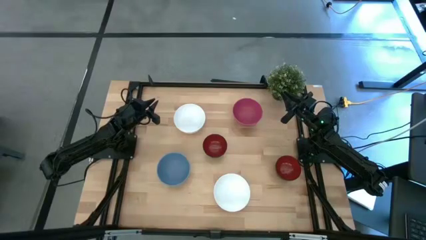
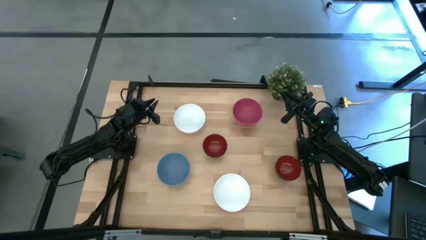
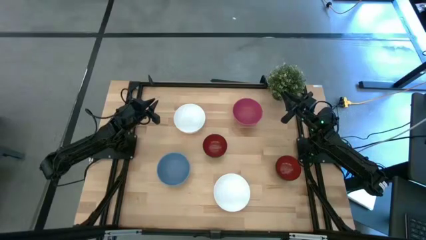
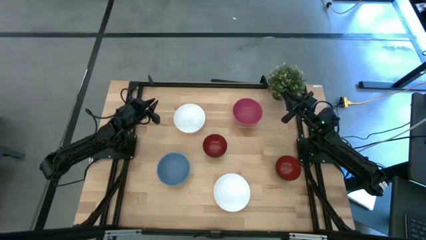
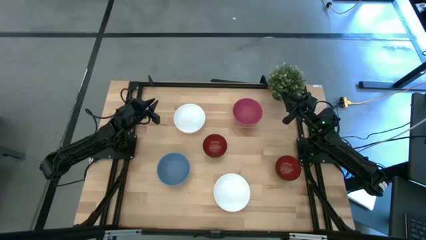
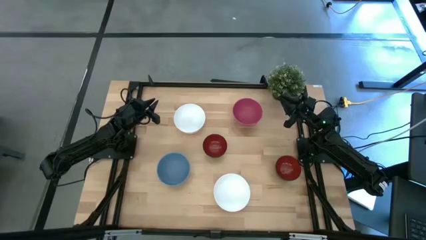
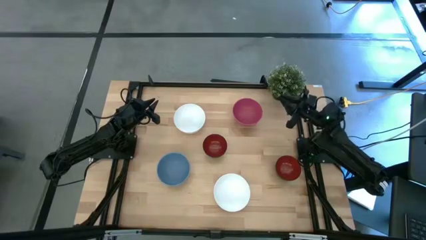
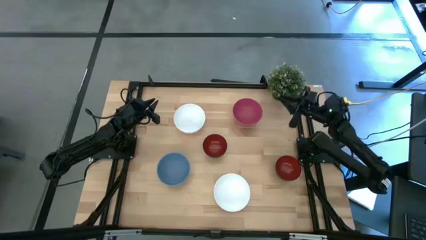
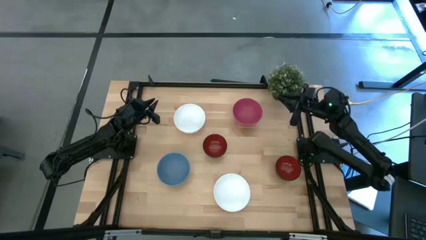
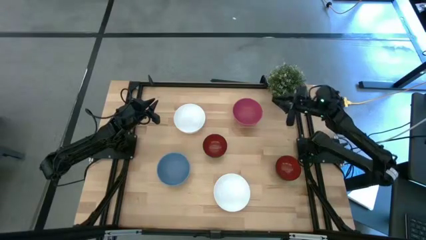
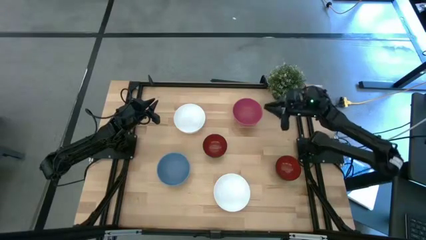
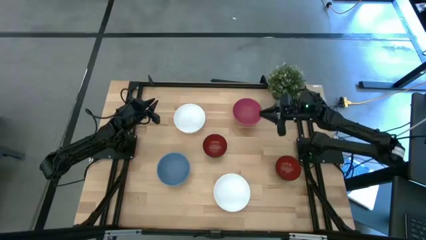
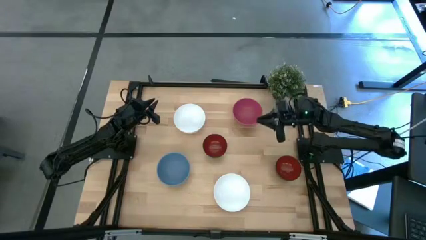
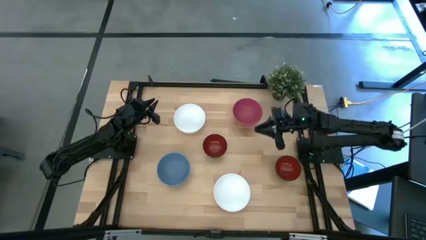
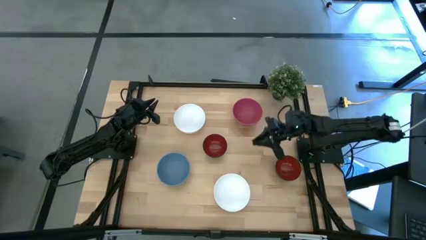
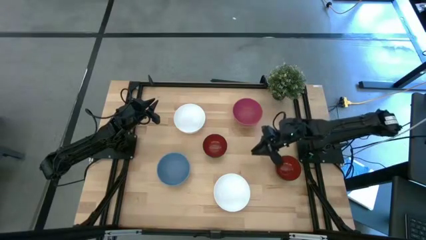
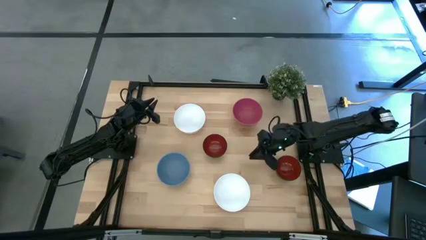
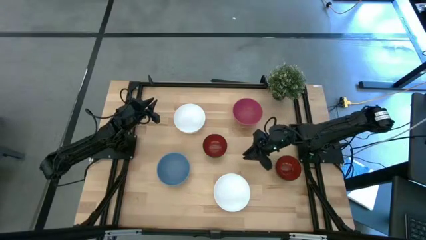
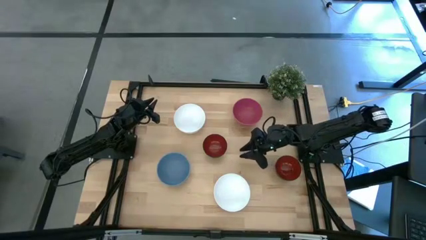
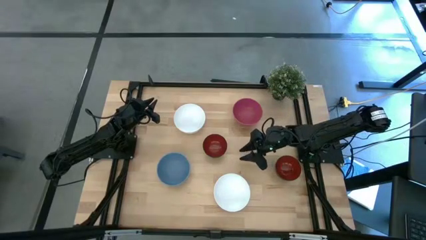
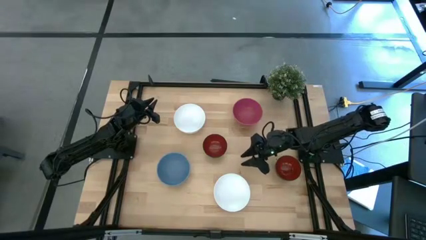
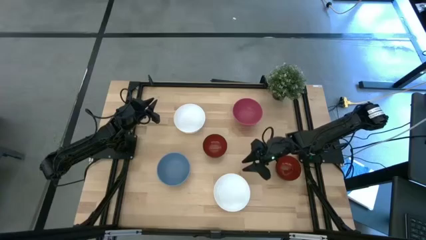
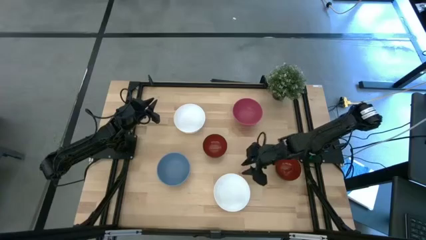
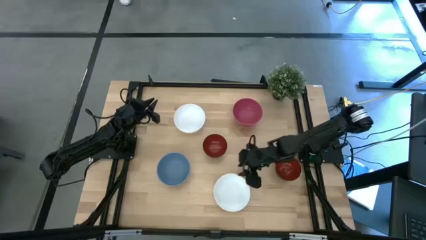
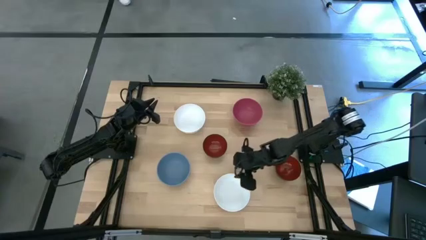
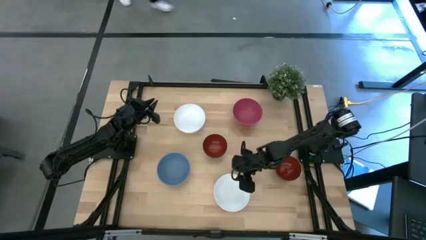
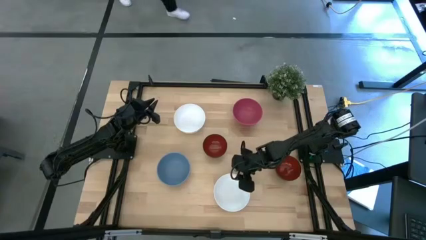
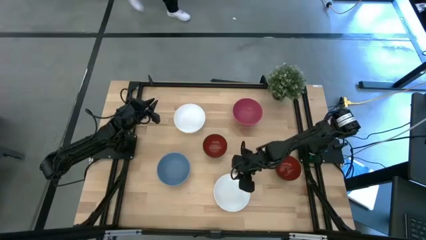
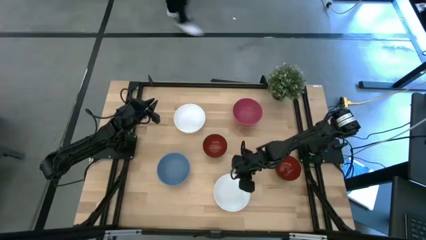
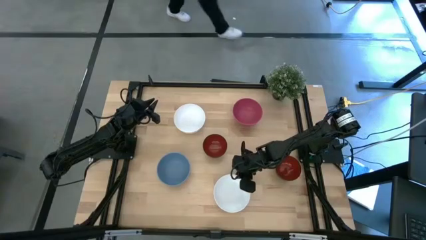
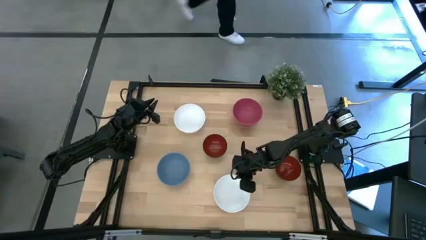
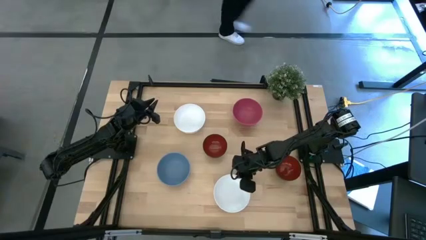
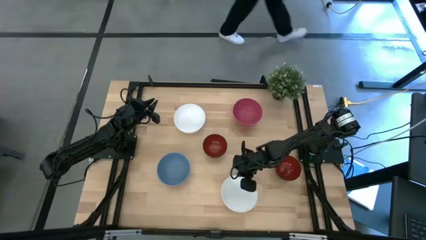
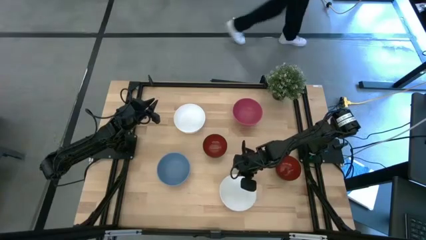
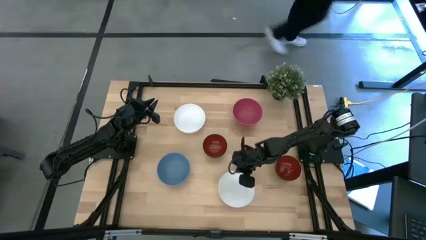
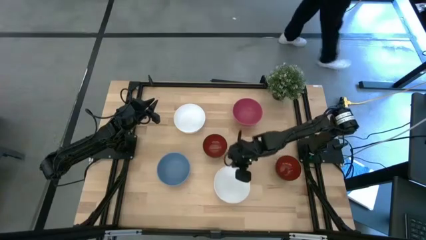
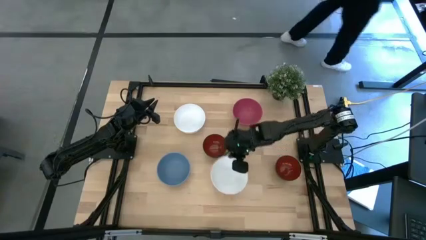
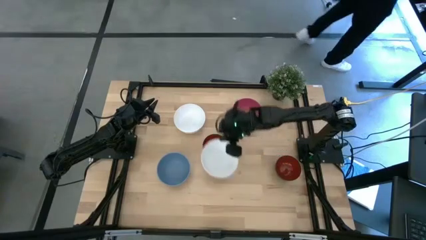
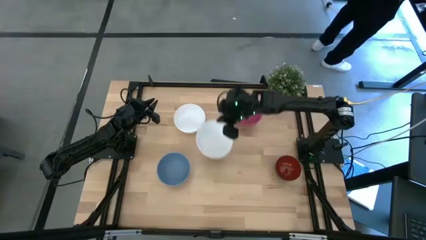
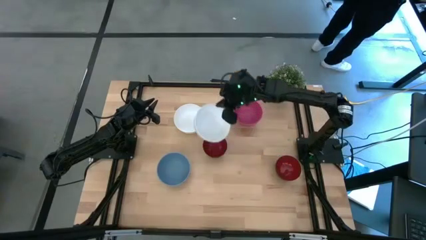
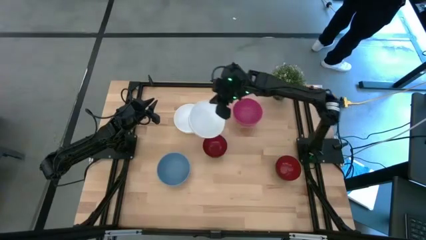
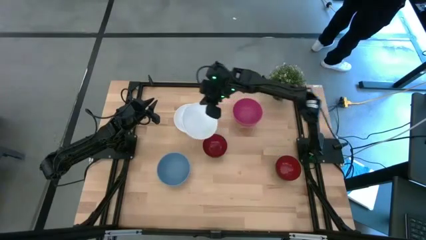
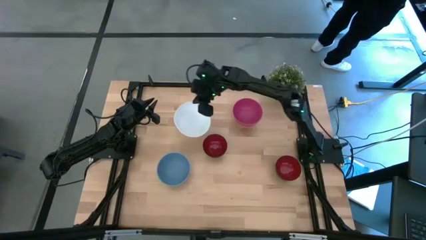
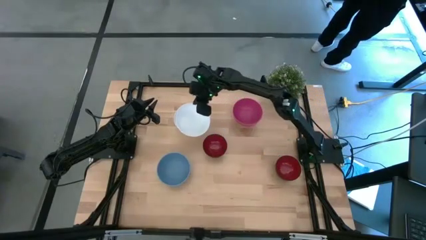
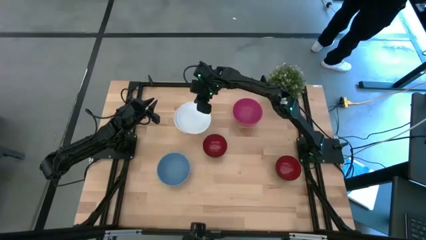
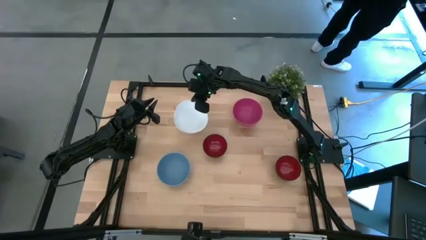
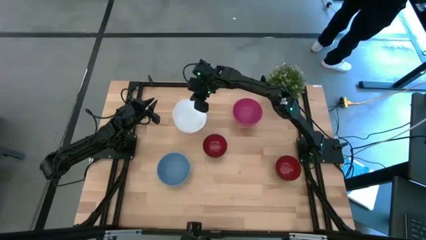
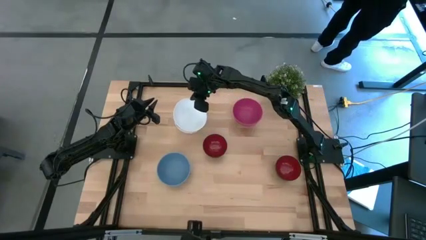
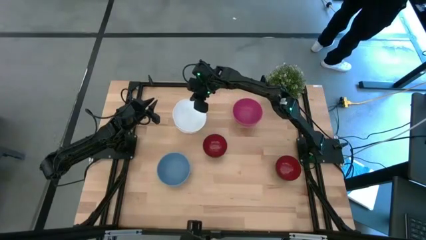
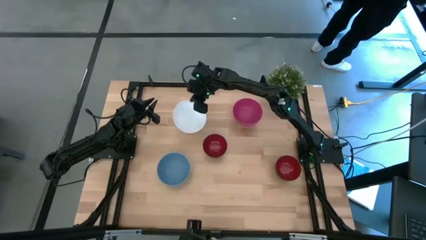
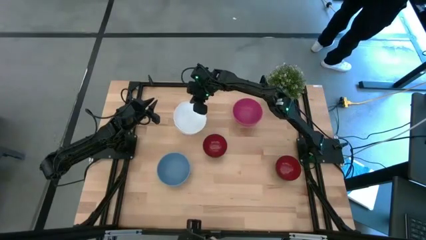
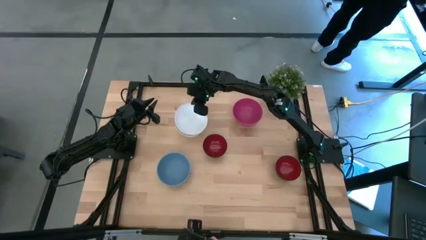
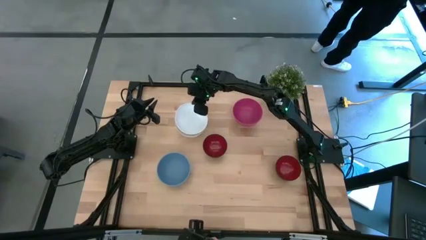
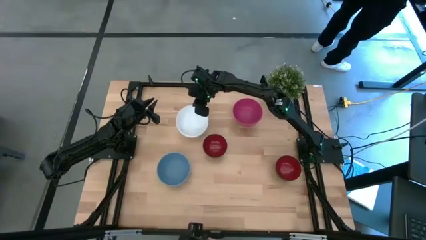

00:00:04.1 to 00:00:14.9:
Task: Nest bowls inside each other
Stack the bottom white bowl into the top white bowl

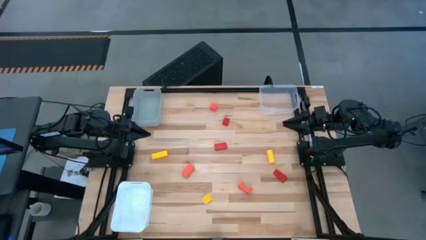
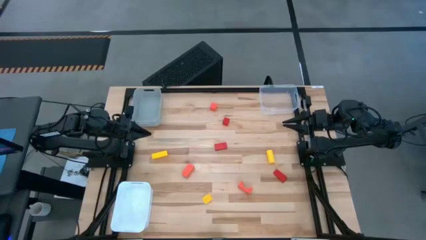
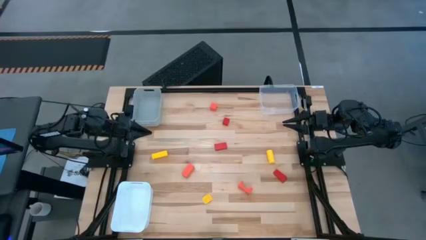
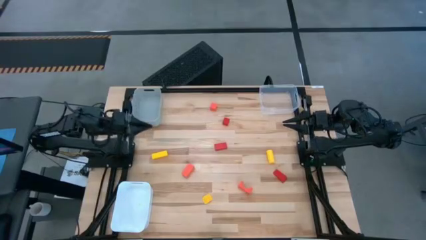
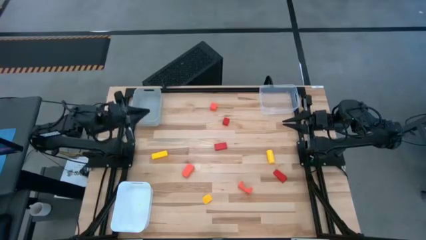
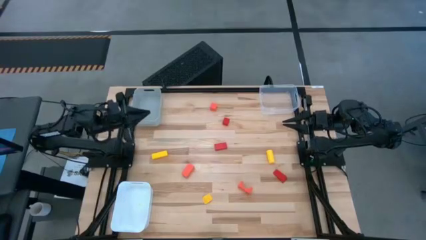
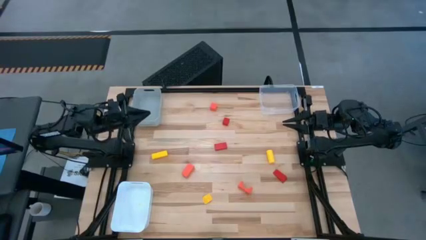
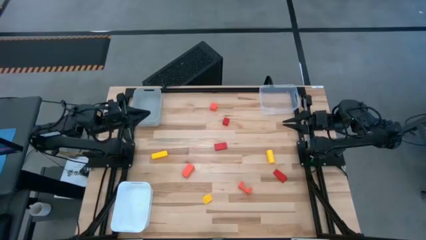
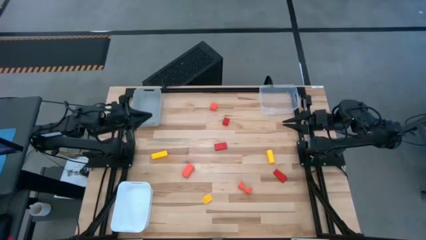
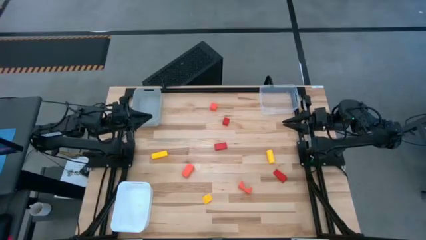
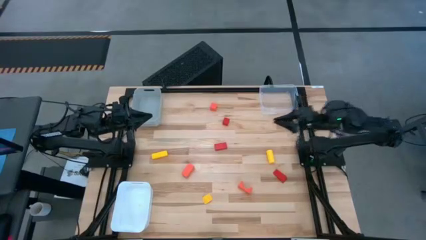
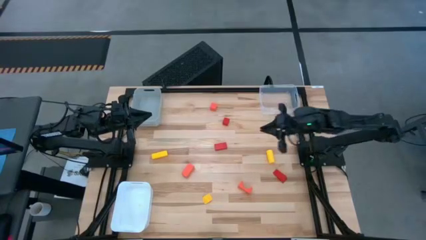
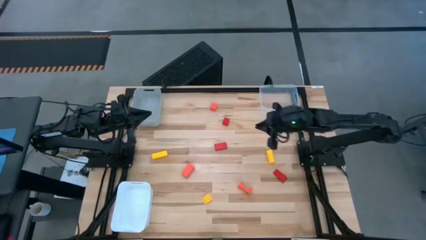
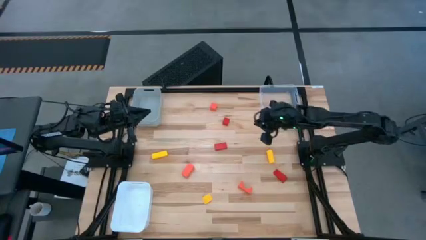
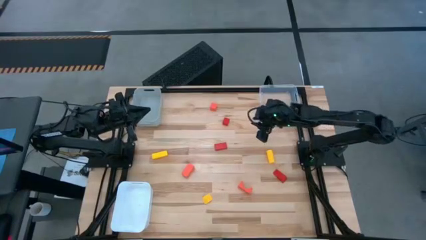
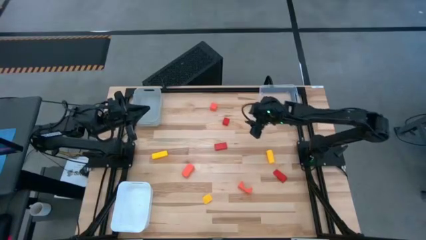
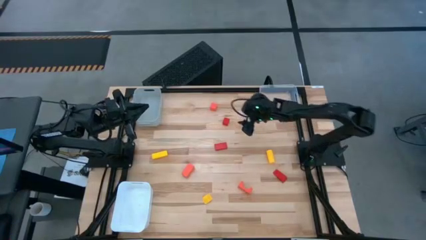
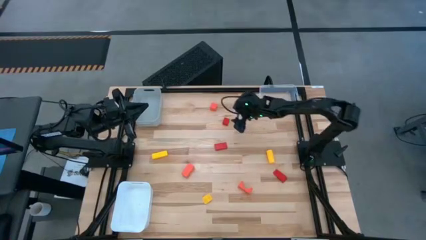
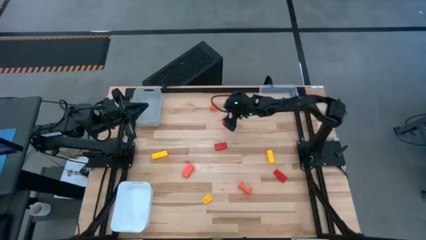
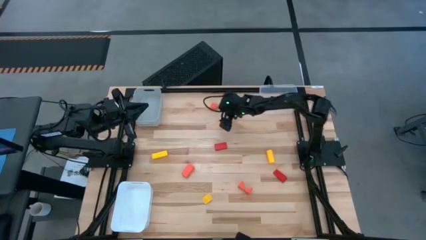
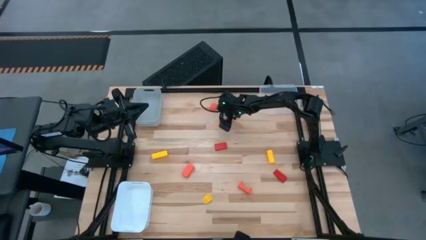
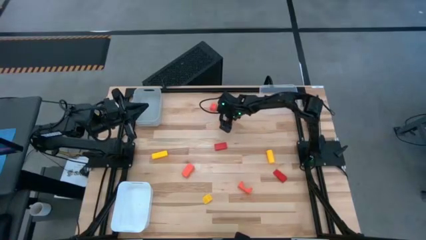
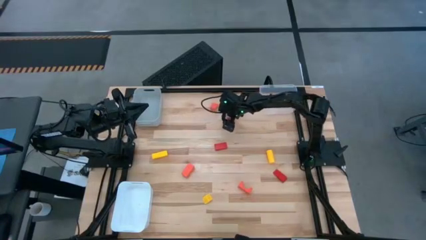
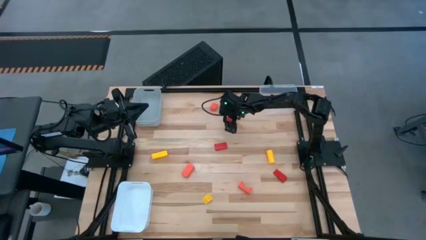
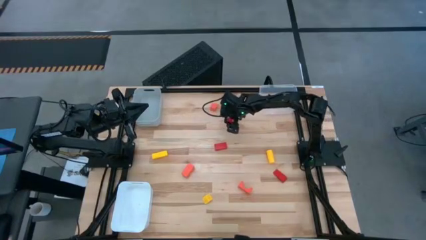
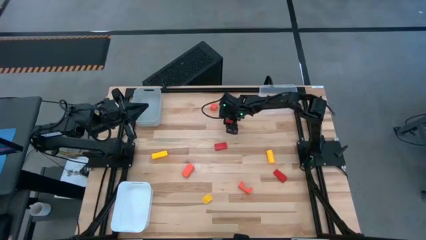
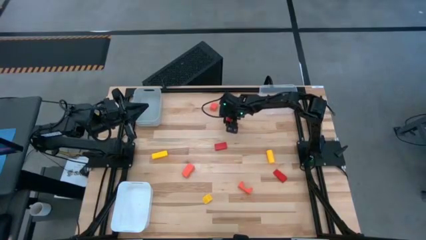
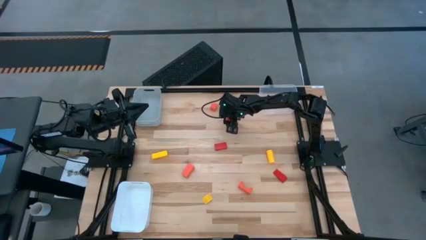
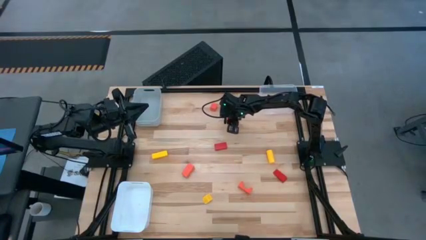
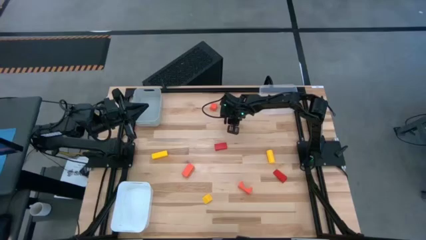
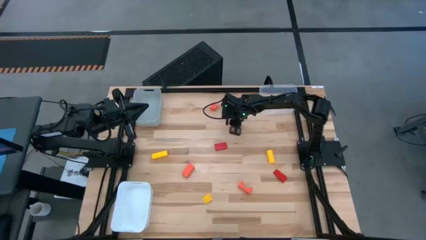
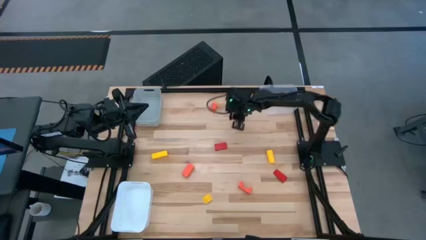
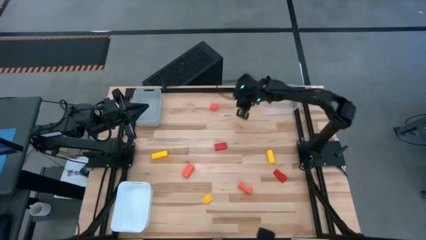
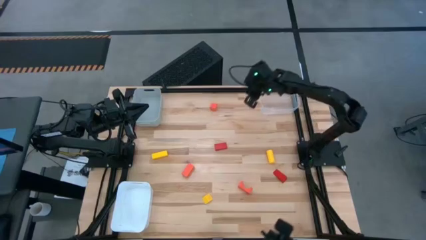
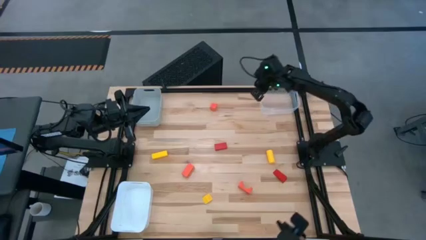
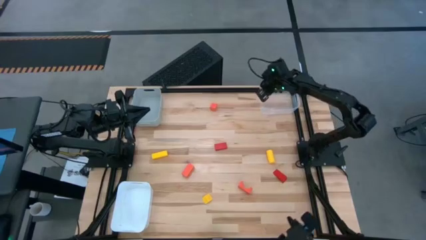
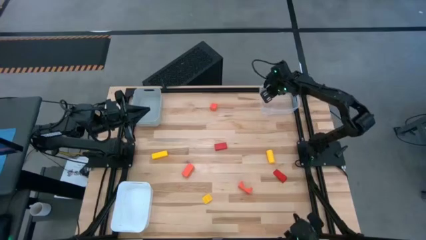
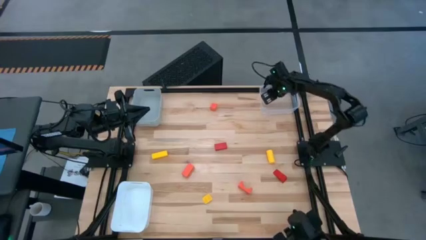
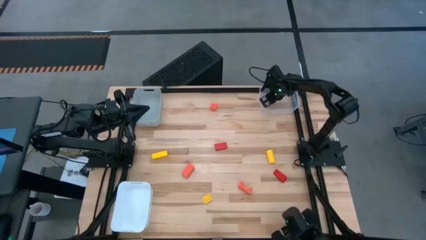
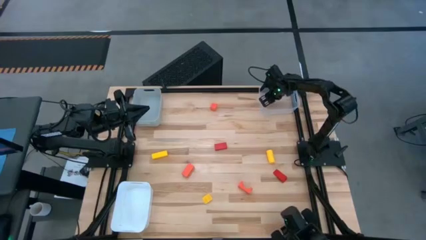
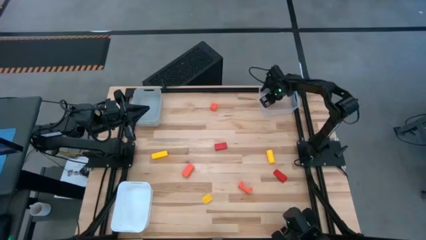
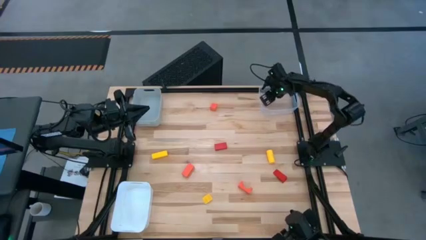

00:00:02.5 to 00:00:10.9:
Task: Sort & place blocks by color
Put the top red block into the transparent bin
